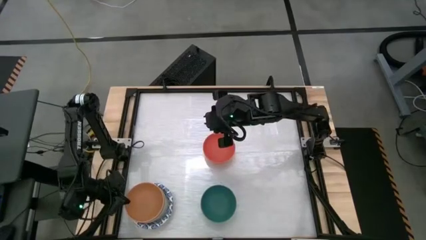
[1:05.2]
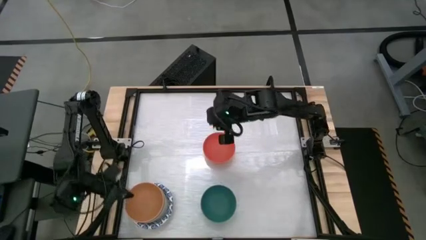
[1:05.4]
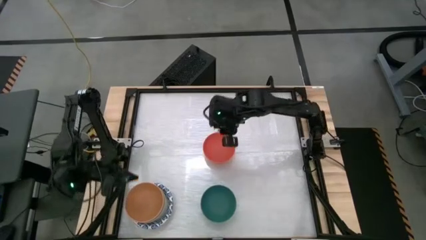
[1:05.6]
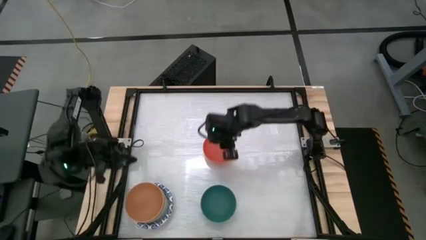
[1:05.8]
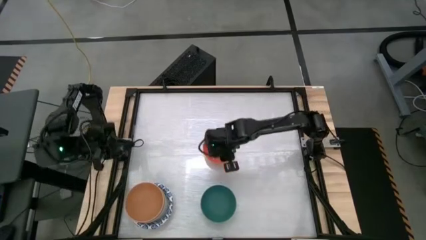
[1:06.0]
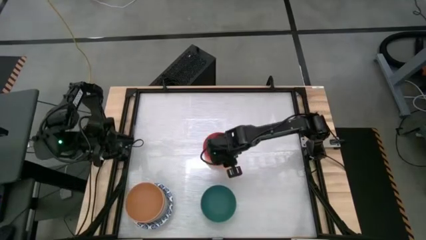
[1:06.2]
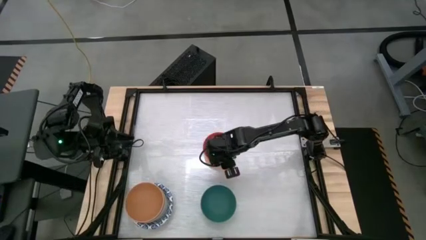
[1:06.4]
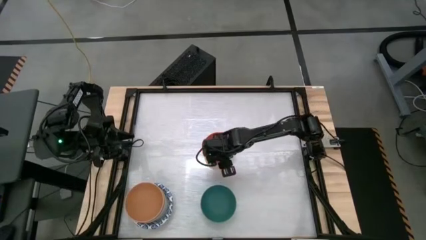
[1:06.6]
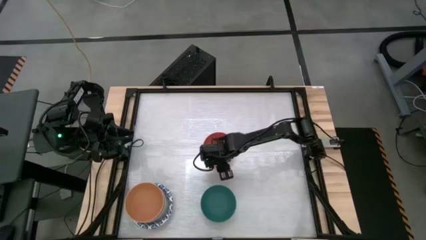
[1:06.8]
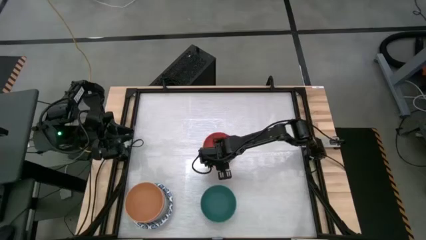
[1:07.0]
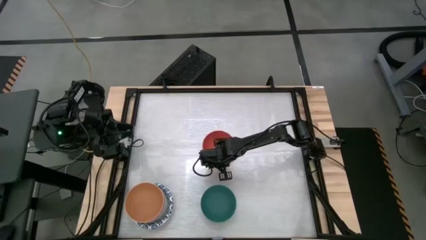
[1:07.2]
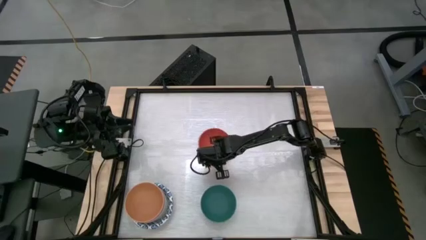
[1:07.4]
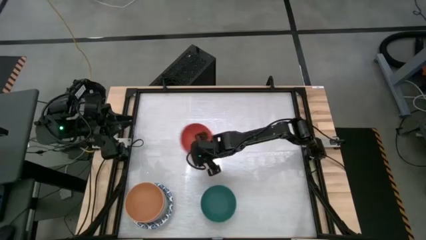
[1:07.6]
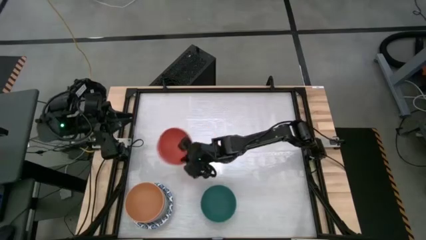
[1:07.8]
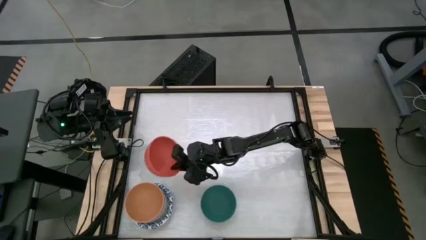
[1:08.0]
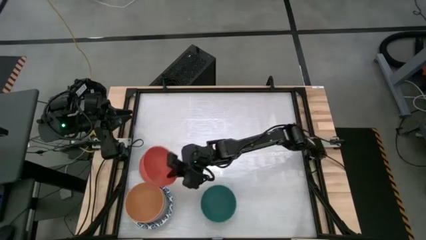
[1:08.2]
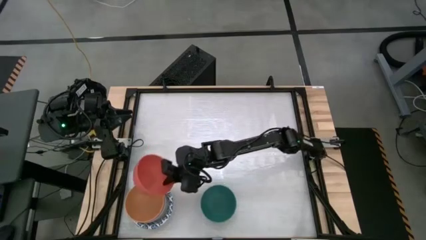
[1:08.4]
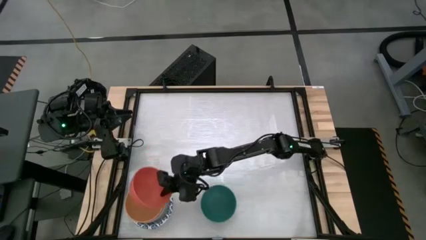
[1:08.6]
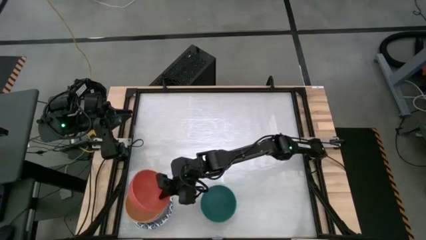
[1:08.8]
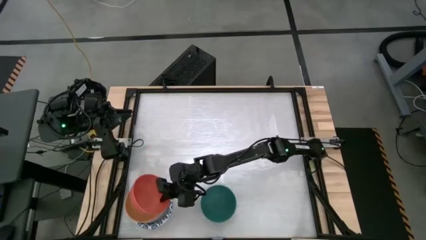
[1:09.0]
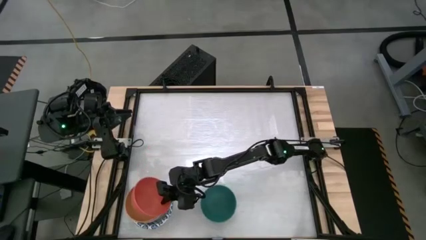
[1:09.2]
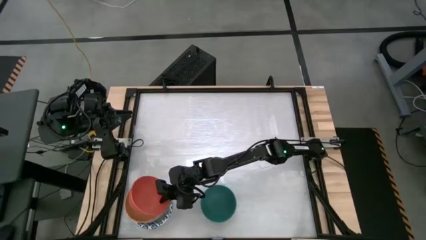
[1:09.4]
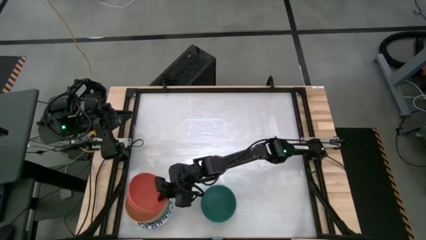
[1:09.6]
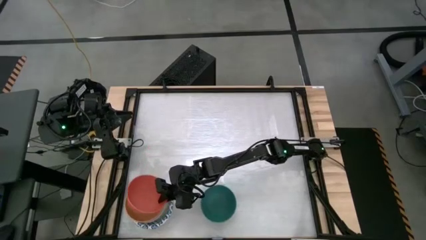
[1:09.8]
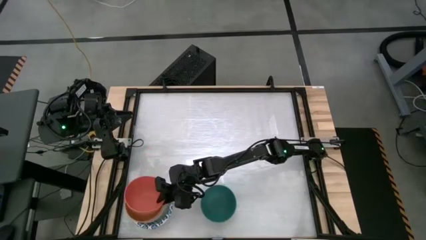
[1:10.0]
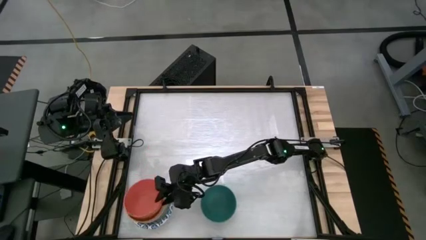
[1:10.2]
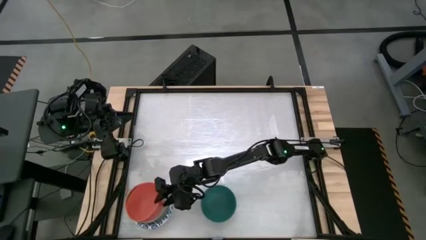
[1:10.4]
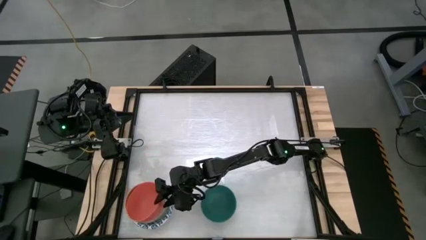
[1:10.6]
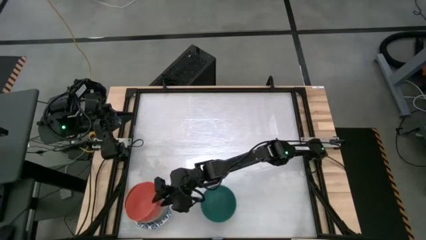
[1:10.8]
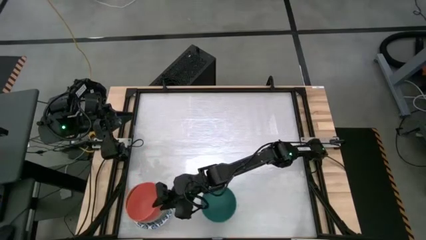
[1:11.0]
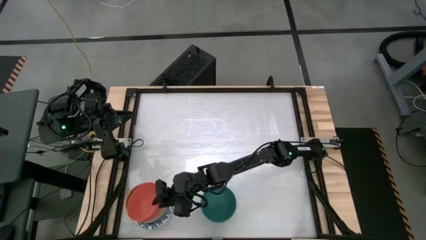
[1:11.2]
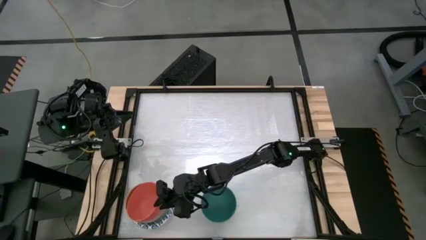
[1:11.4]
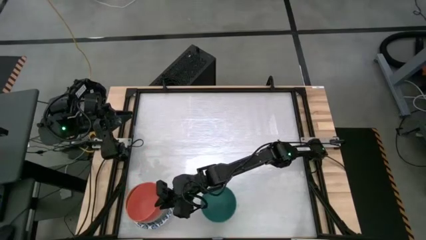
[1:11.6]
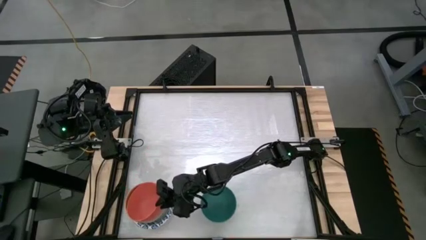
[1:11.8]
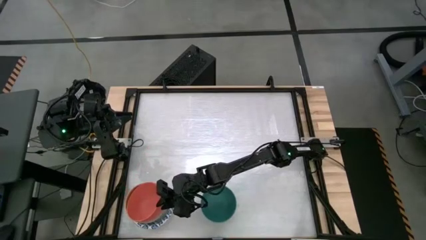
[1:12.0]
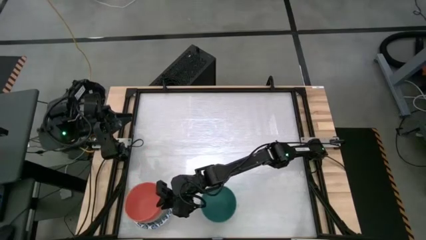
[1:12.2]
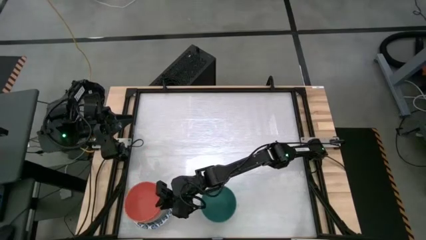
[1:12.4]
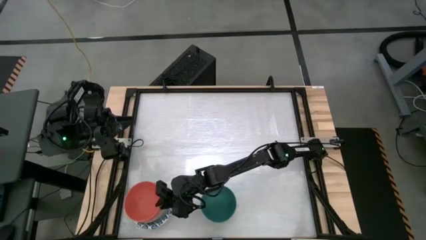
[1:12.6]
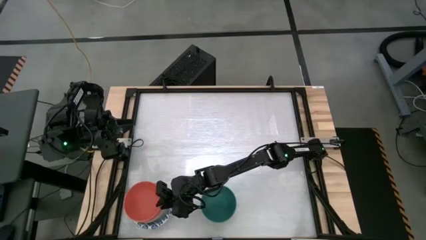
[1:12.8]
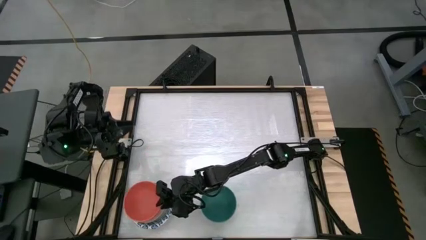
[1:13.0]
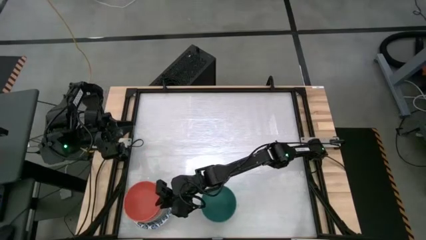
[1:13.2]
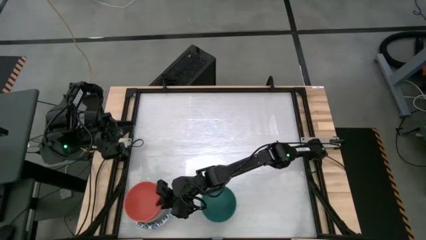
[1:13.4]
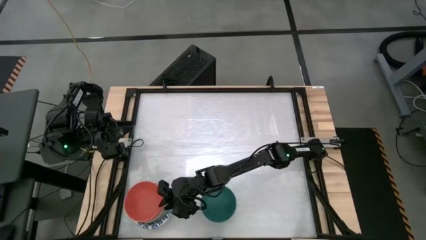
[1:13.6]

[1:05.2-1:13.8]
Stack the red bowl into the orange bowl
